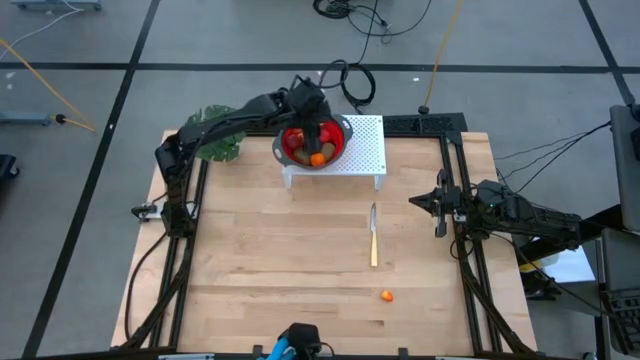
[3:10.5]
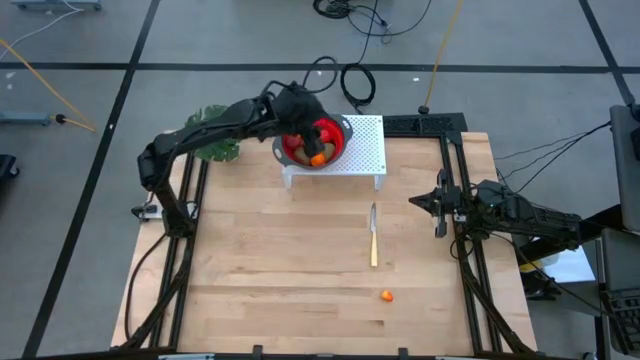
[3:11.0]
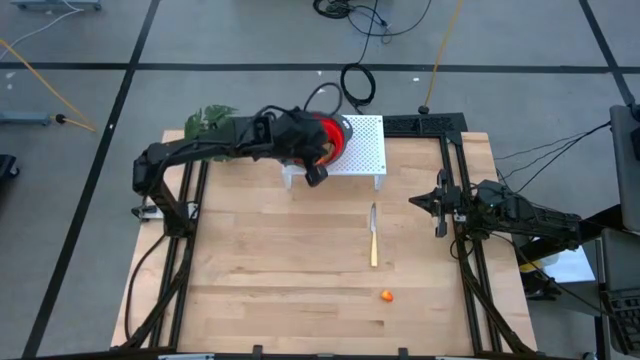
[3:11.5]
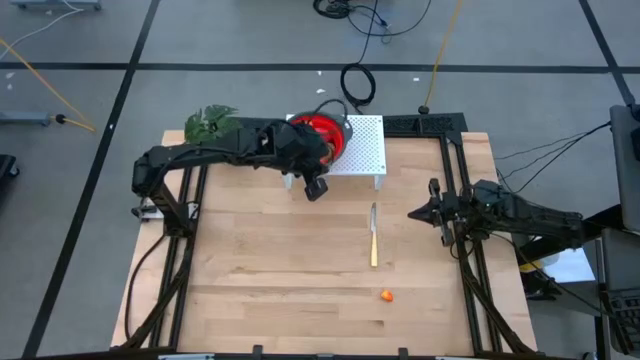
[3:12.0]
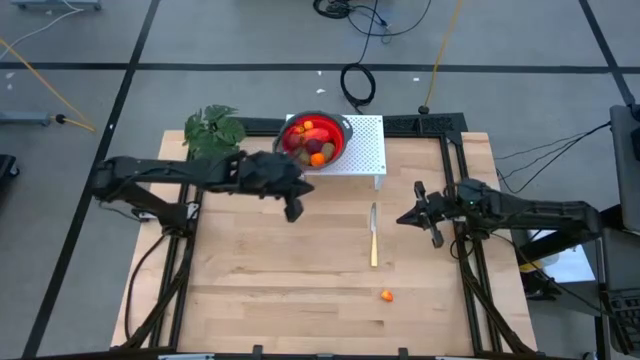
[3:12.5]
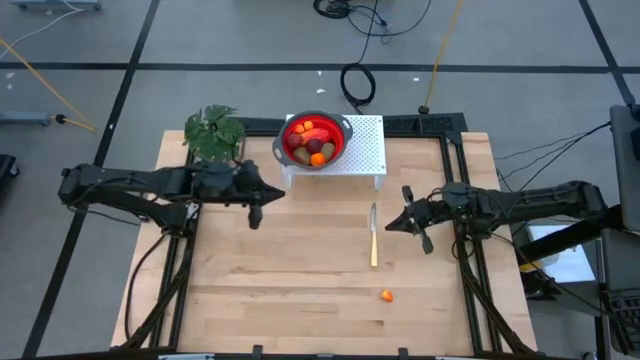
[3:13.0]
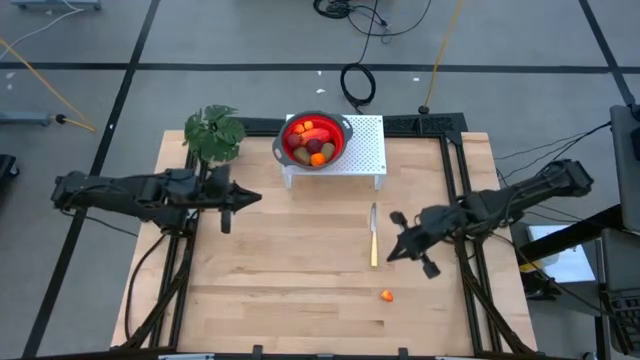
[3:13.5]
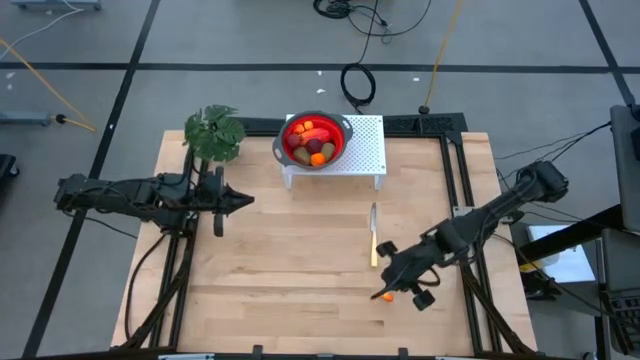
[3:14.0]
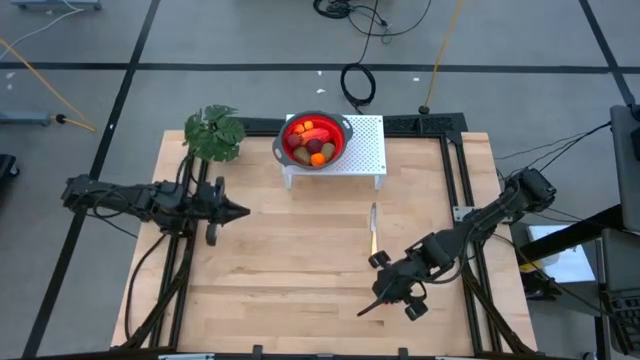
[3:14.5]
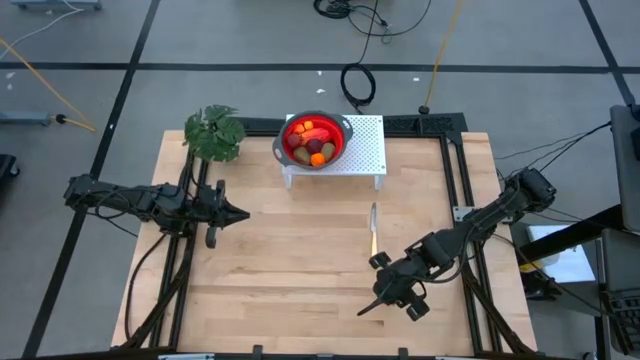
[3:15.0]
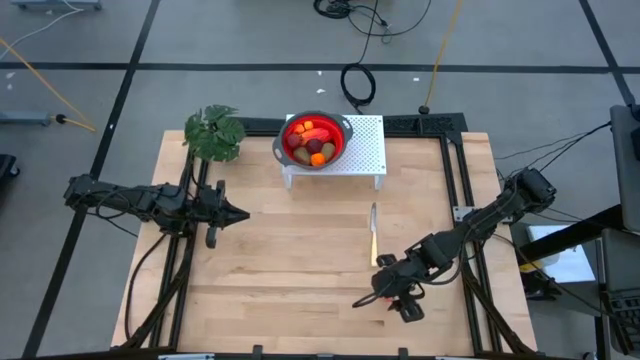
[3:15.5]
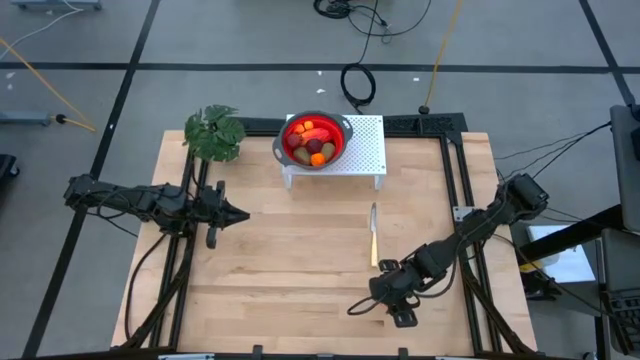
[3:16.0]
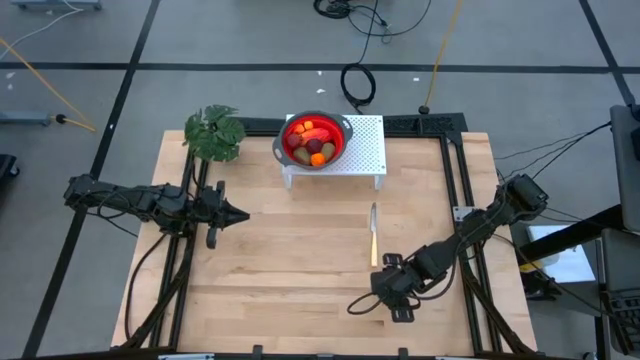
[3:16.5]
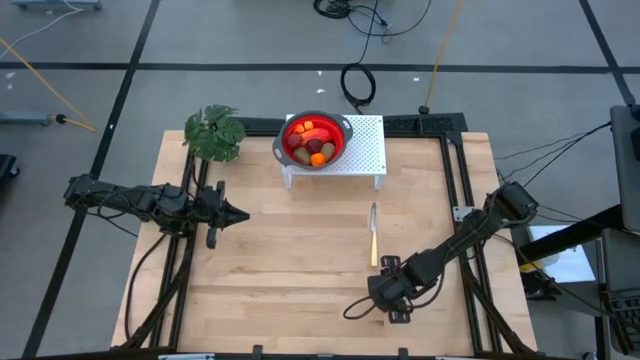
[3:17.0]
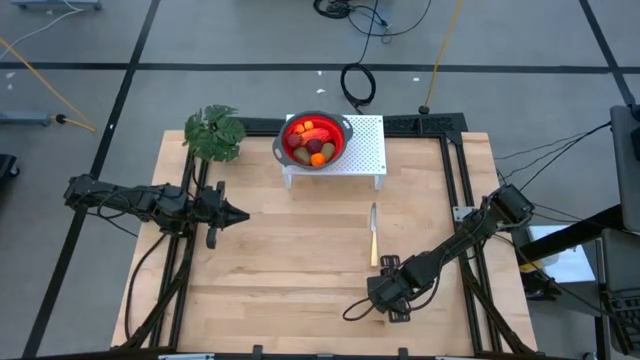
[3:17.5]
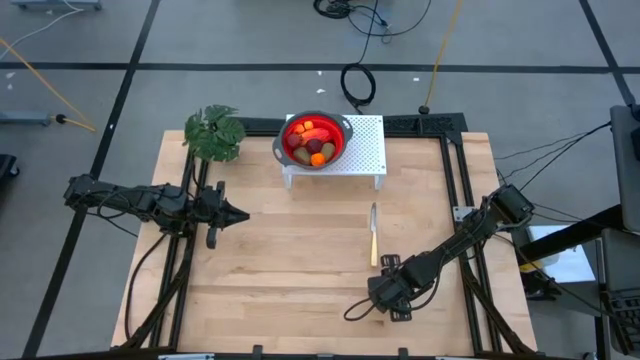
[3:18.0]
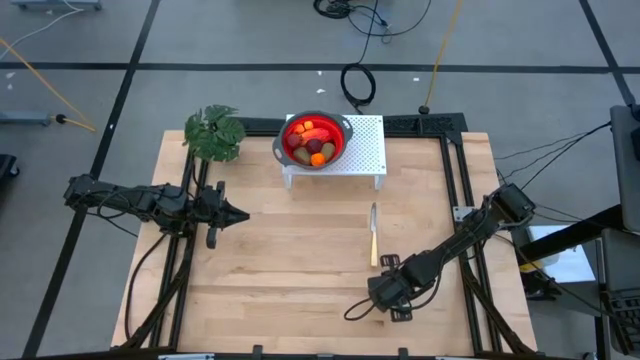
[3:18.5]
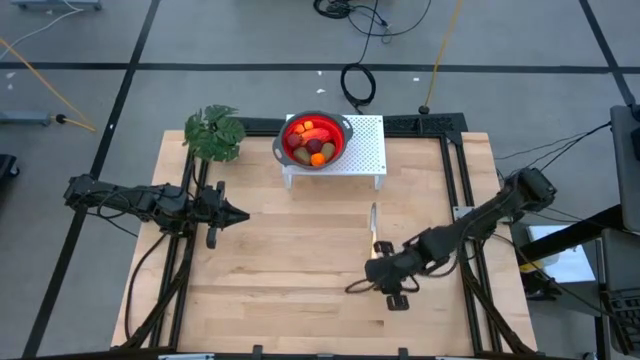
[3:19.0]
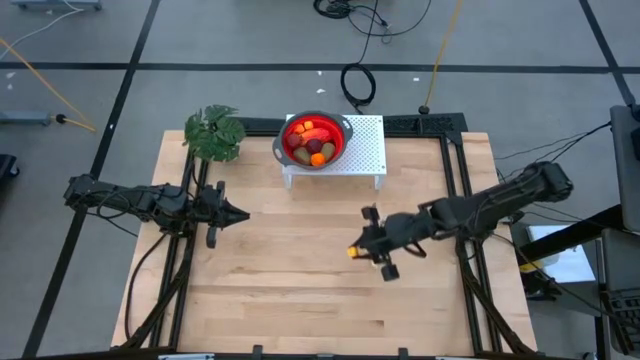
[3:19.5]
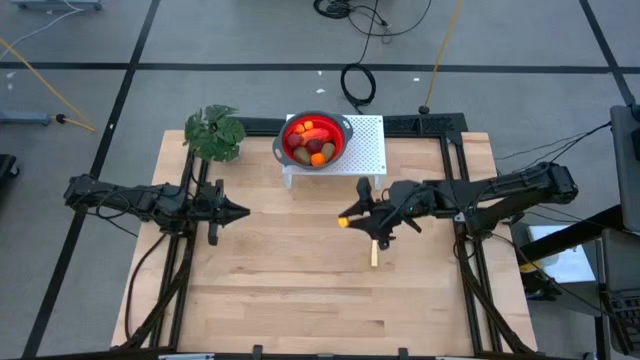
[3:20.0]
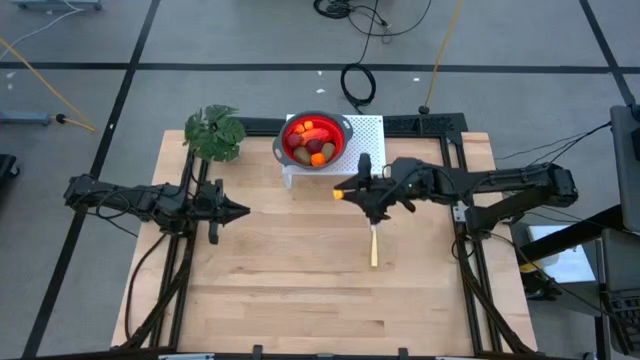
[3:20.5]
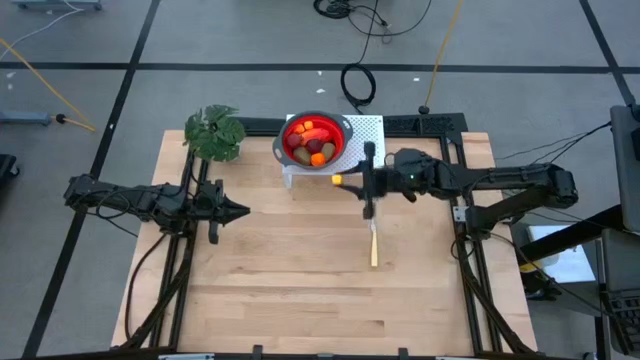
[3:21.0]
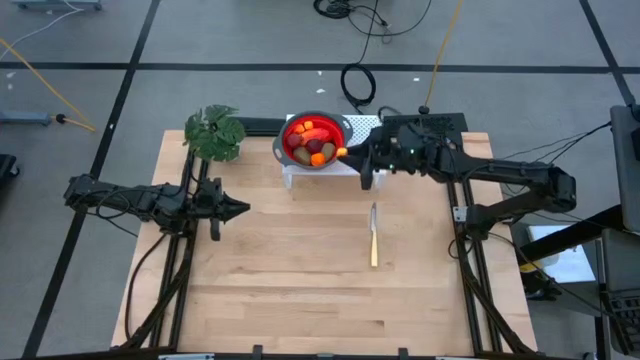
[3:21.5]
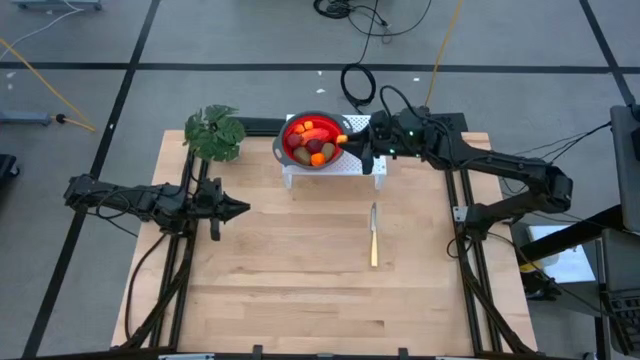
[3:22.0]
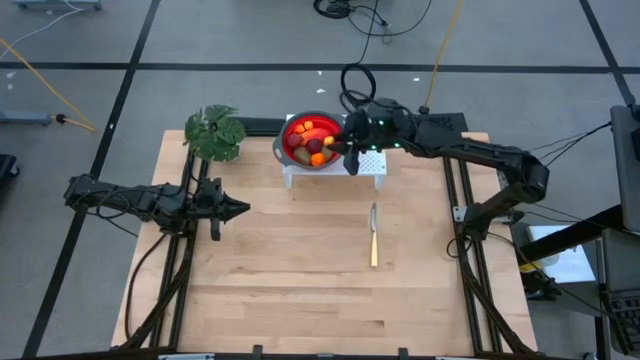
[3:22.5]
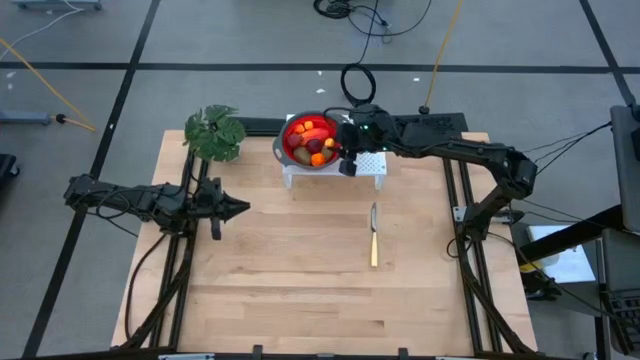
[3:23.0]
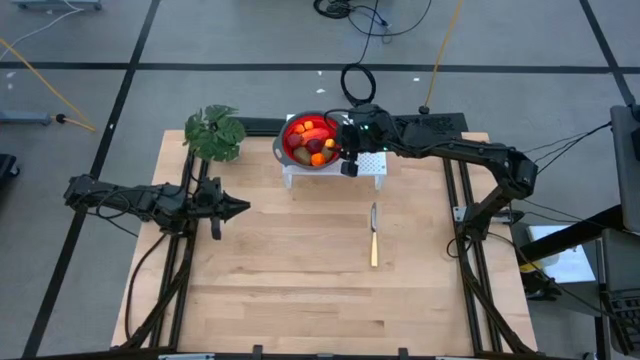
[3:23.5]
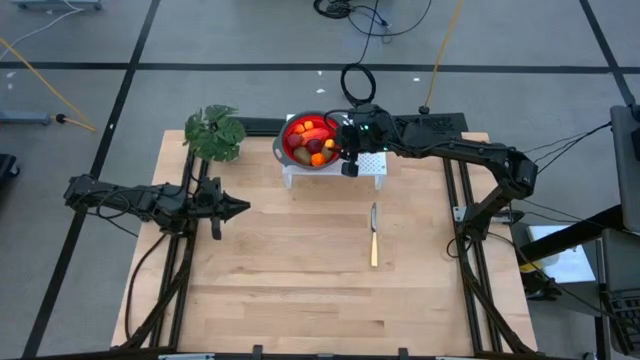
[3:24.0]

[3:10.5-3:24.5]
Task: Pick & Place Fruit
Put the orange pear into the red strainer bowl on the shelf
